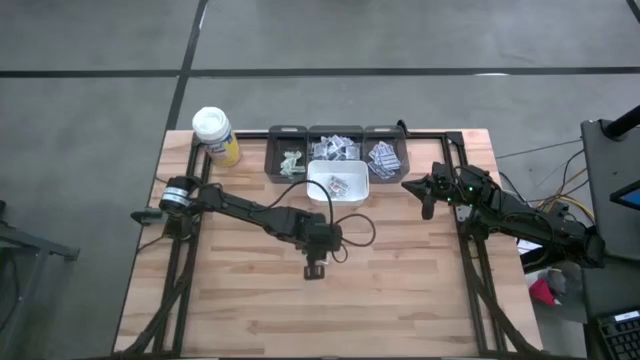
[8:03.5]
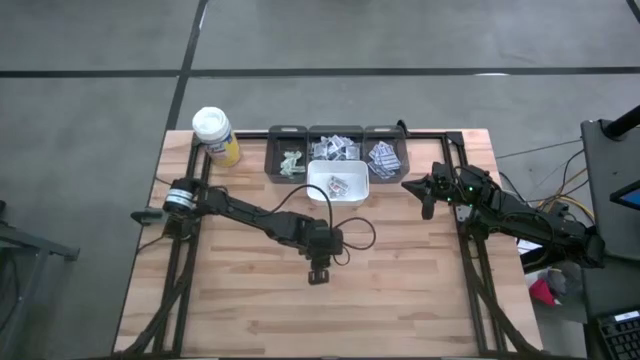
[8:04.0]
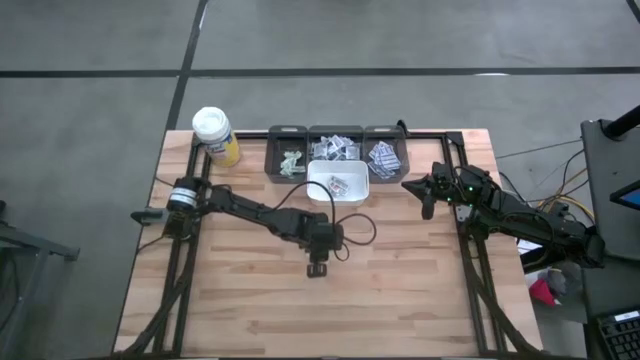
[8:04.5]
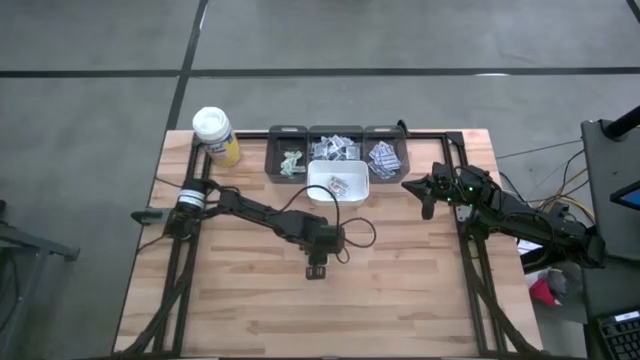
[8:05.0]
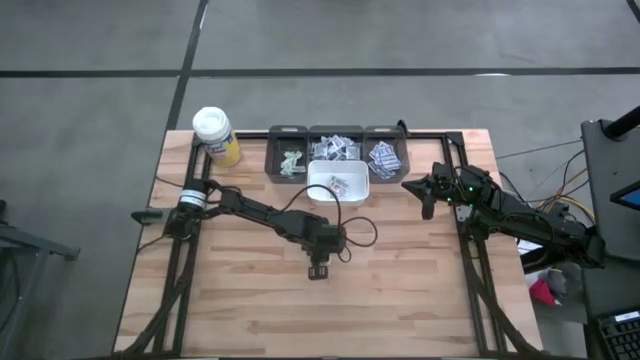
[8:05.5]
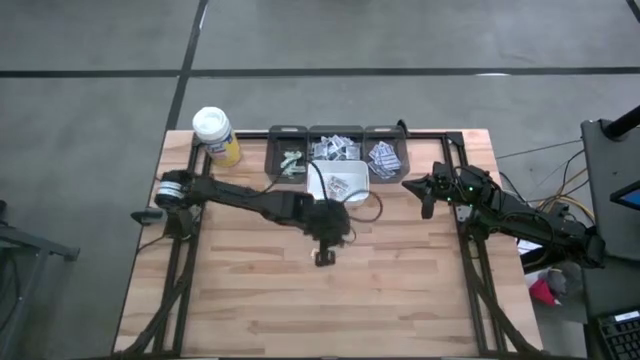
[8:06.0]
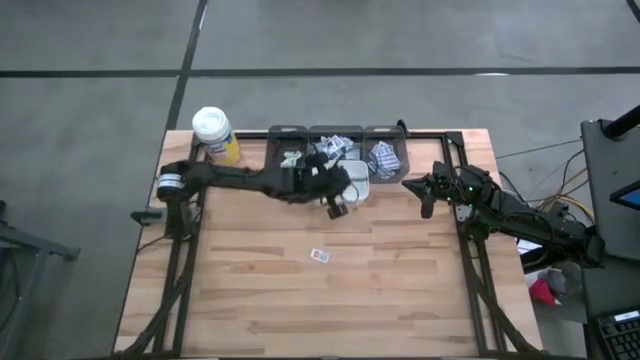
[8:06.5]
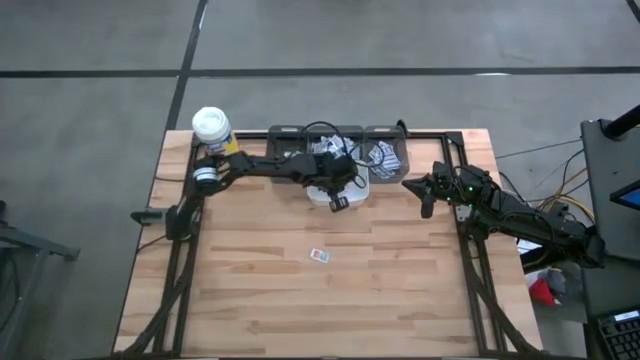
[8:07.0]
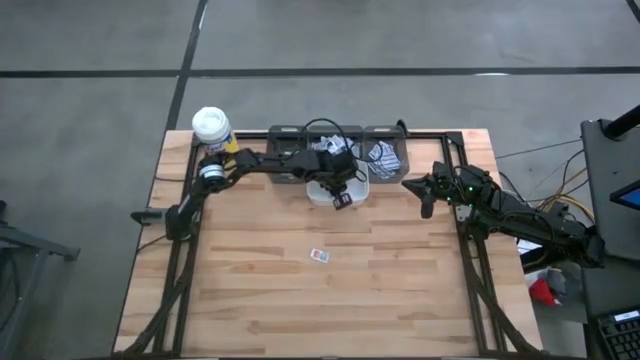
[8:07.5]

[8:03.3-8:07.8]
Task: Pick & Place First Aid Supplies
Put the top ointment pack into the white bin

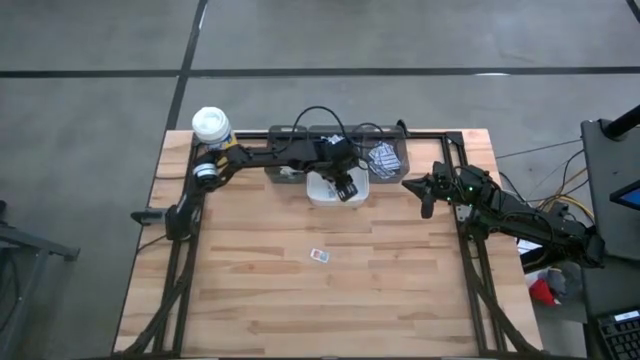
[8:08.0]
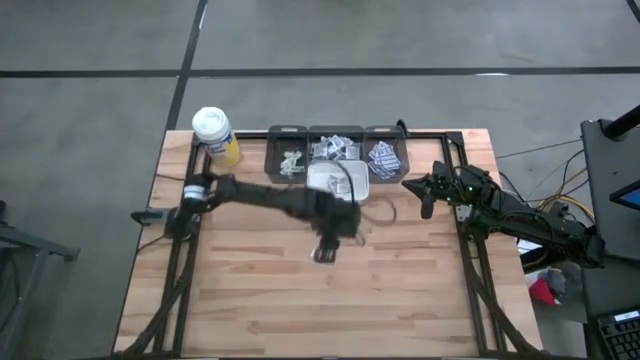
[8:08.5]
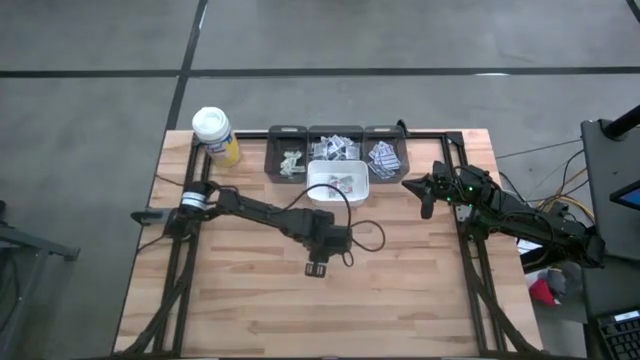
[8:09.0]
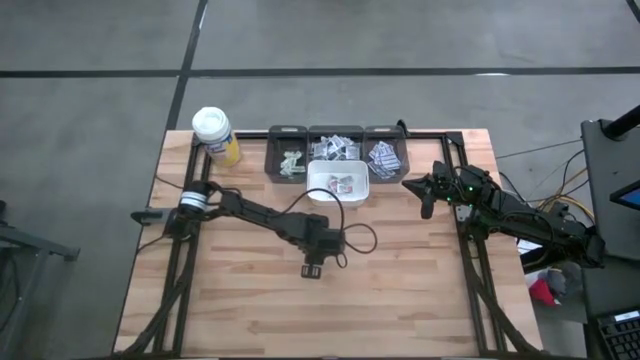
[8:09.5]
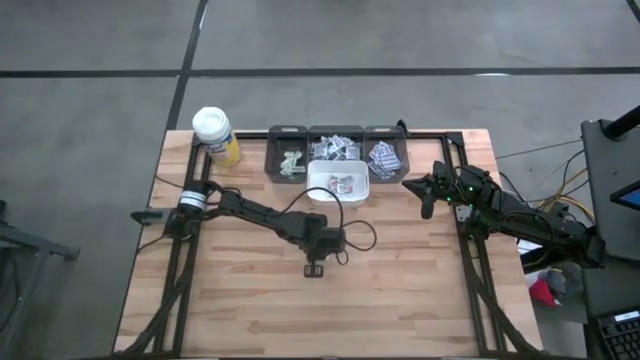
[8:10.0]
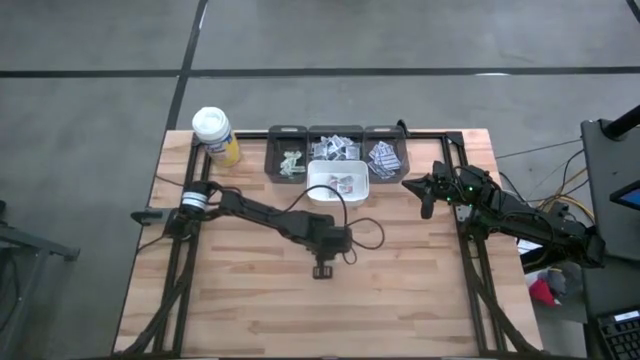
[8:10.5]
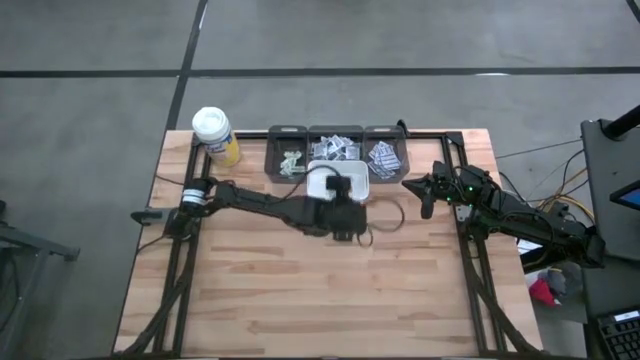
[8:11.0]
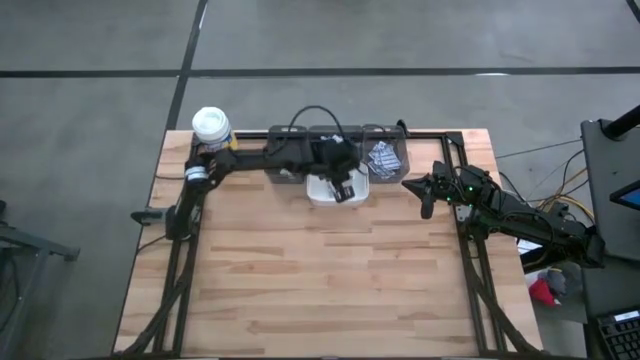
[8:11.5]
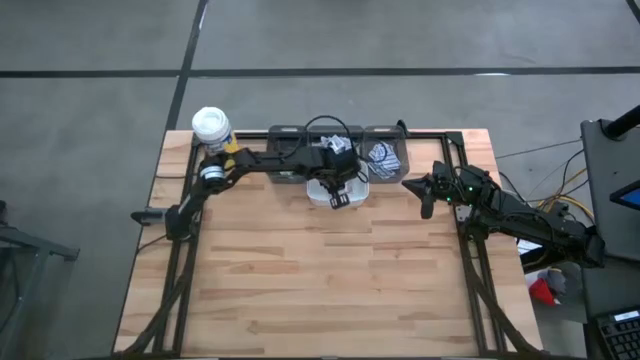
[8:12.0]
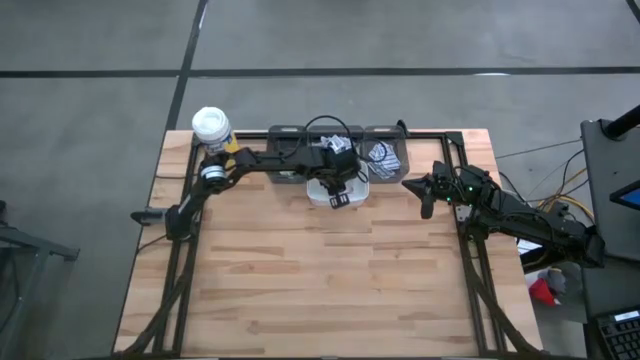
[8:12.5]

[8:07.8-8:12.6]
Put the ointment pack into the white bin

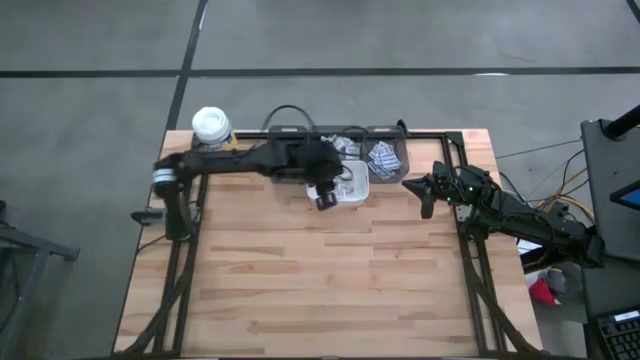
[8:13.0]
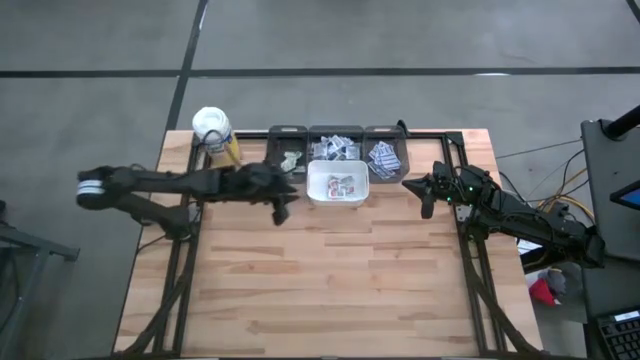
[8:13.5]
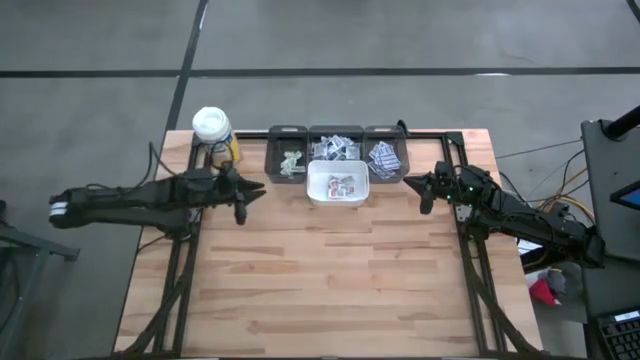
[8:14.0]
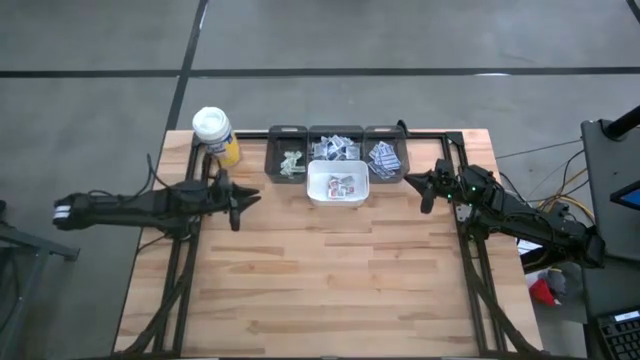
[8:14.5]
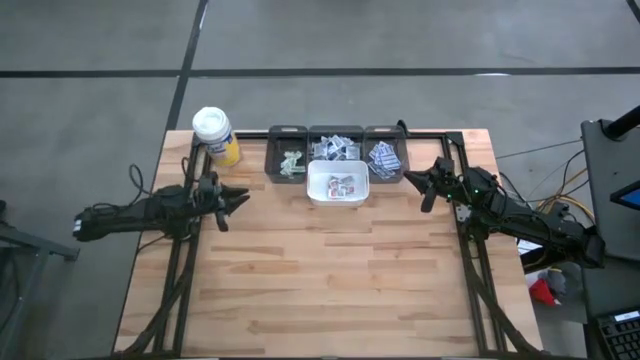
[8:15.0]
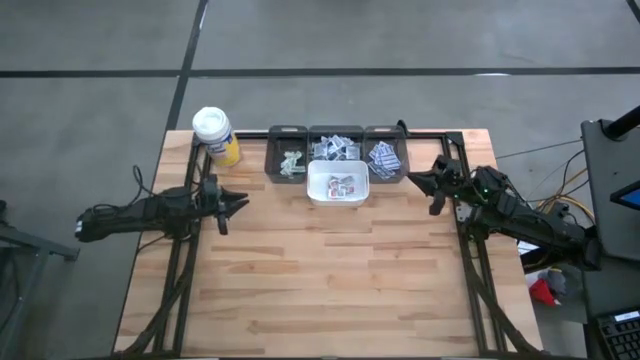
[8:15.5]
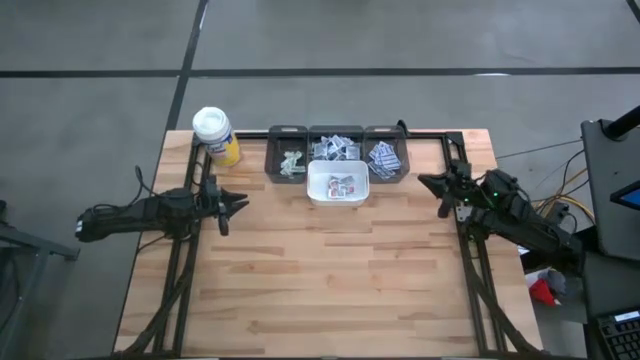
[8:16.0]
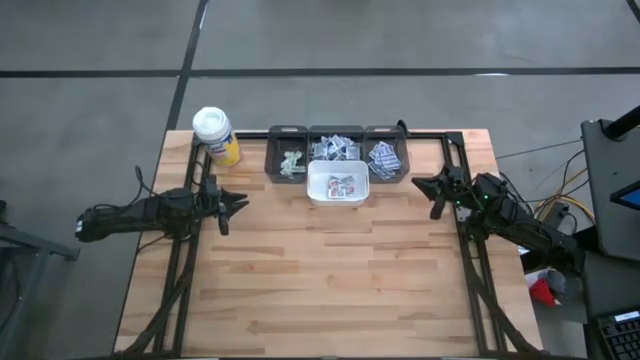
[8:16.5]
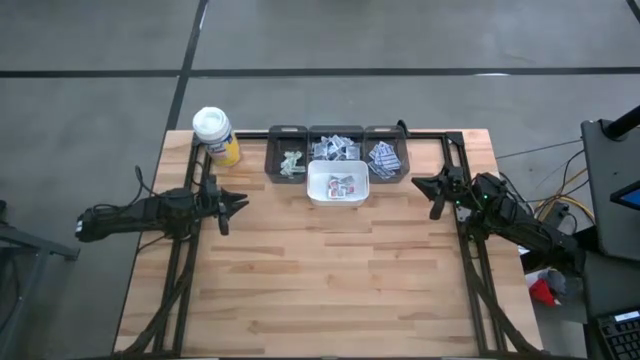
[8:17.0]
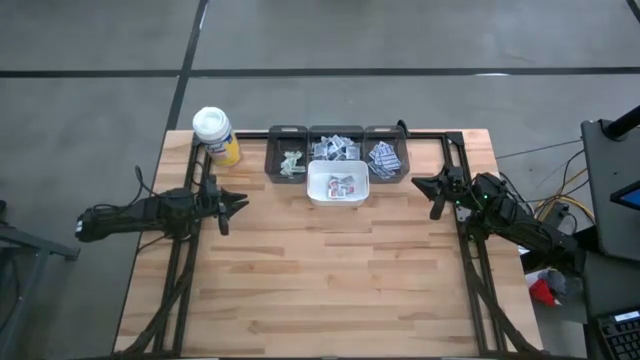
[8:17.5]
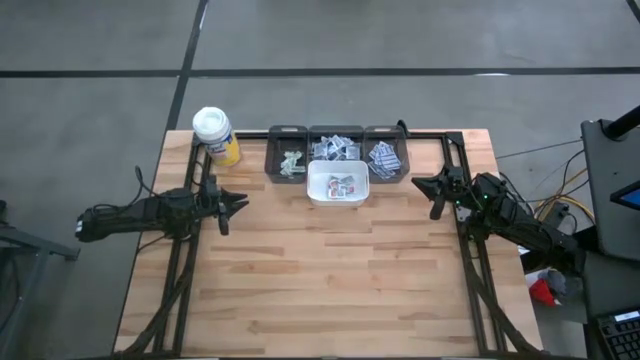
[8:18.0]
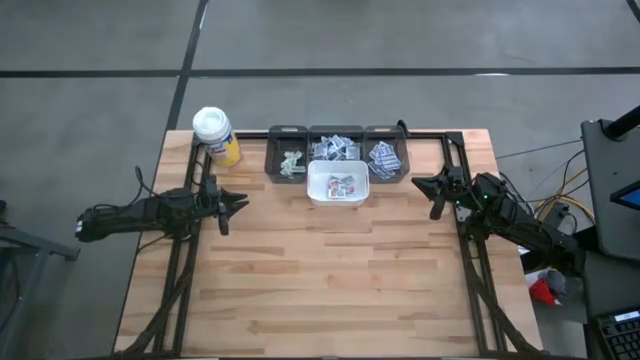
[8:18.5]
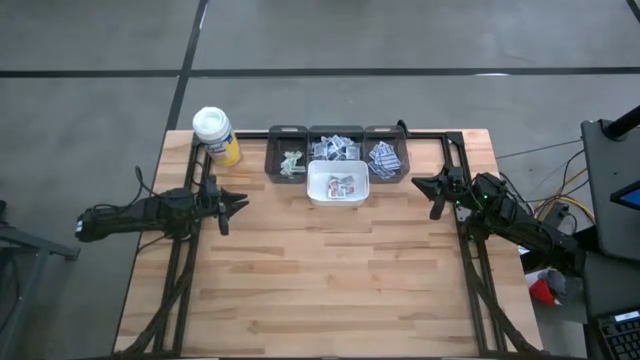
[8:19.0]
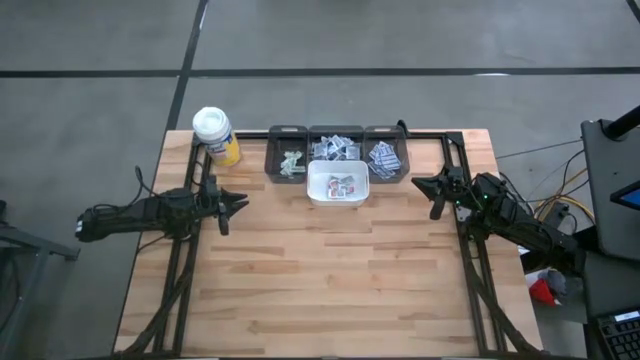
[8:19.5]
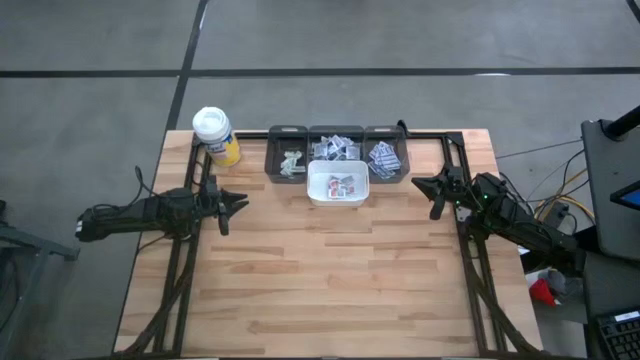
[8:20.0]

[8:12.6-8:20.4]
Return to Home Position

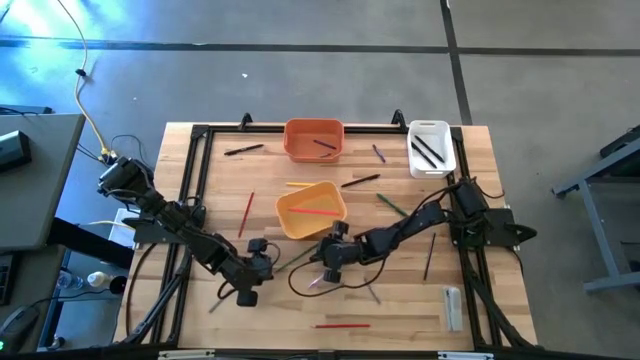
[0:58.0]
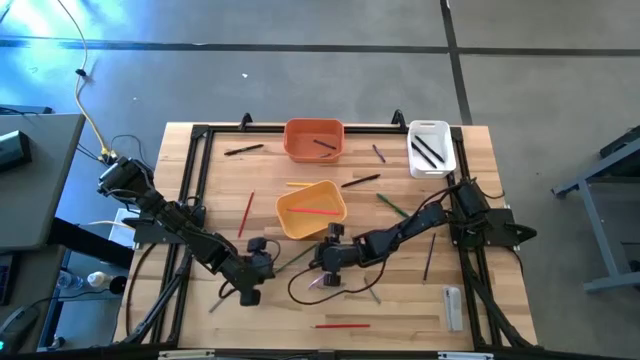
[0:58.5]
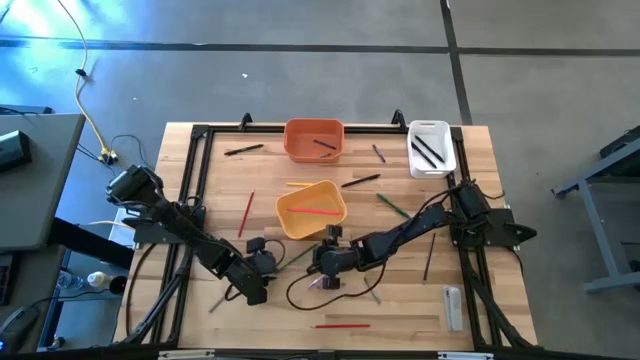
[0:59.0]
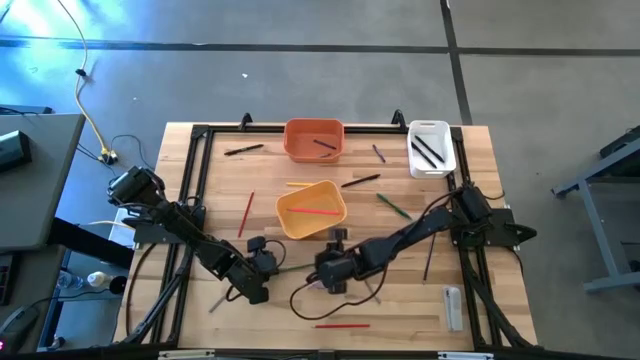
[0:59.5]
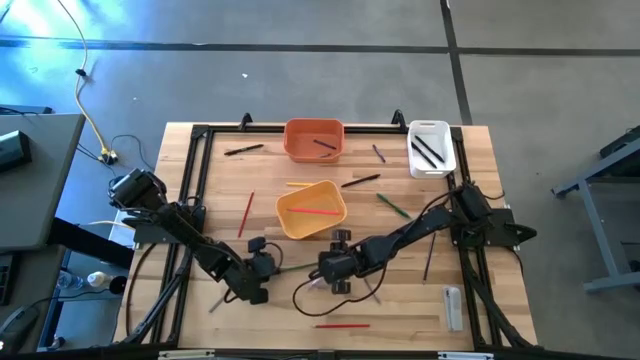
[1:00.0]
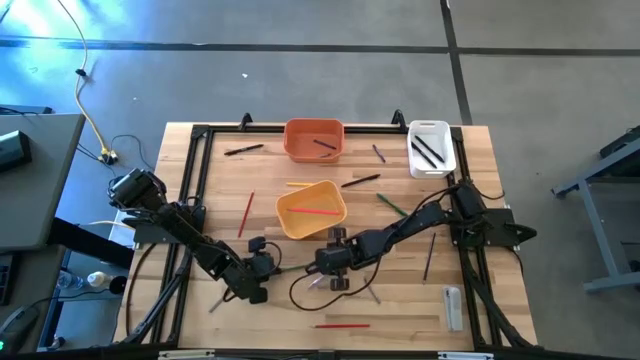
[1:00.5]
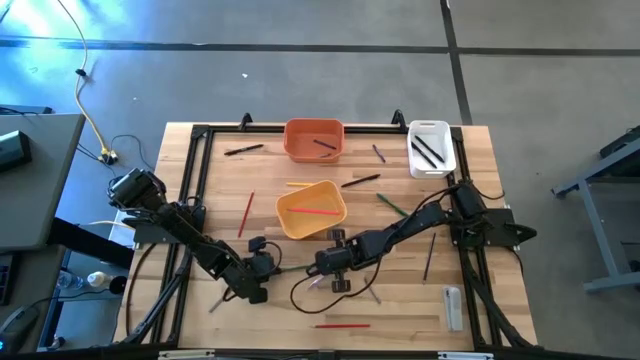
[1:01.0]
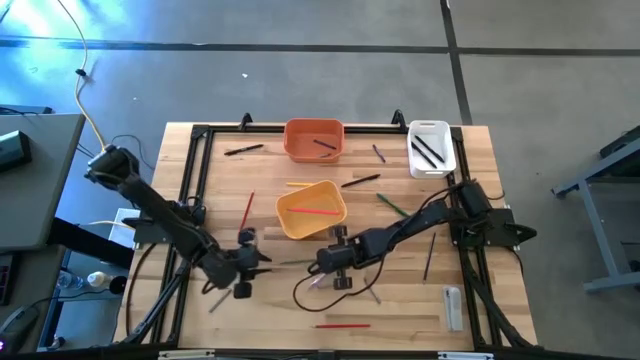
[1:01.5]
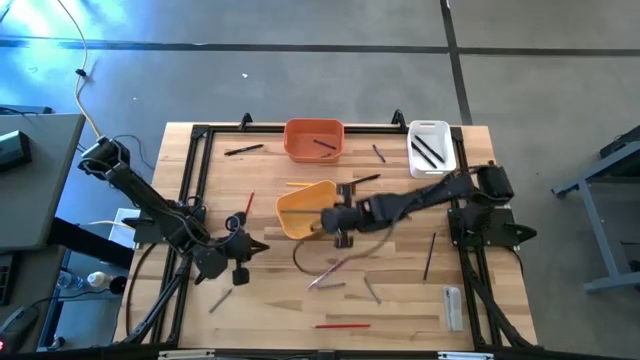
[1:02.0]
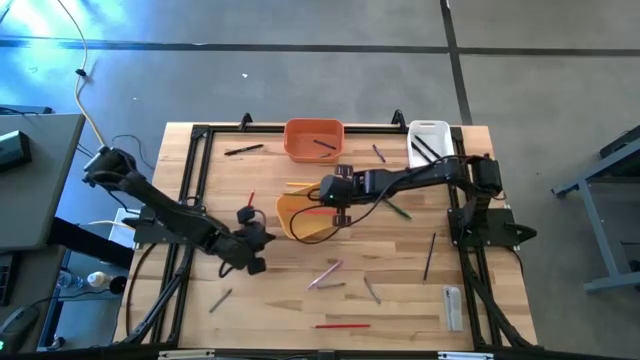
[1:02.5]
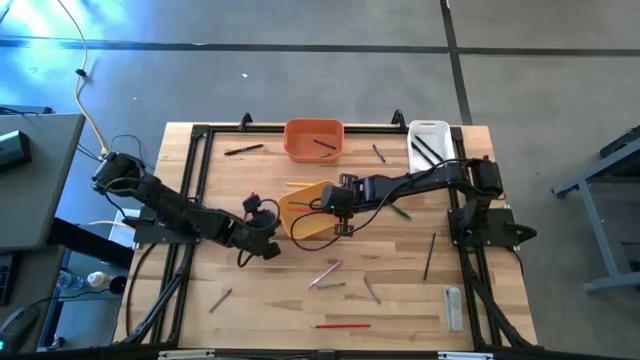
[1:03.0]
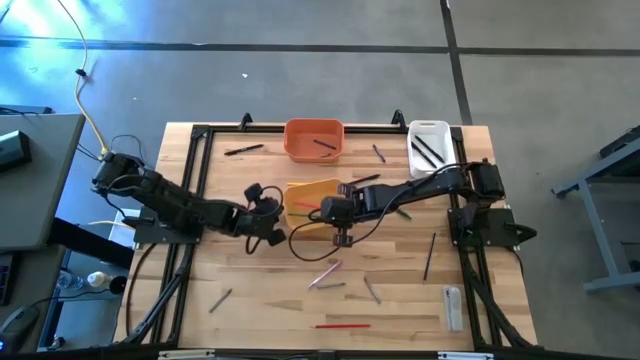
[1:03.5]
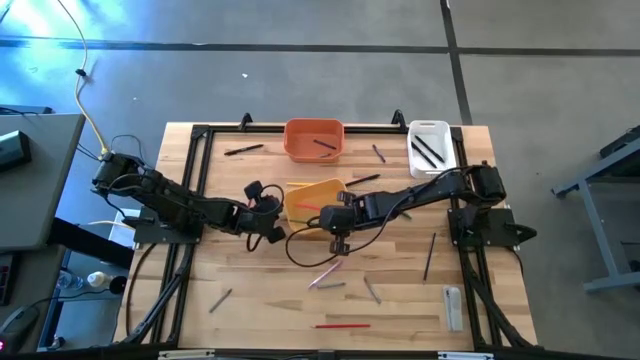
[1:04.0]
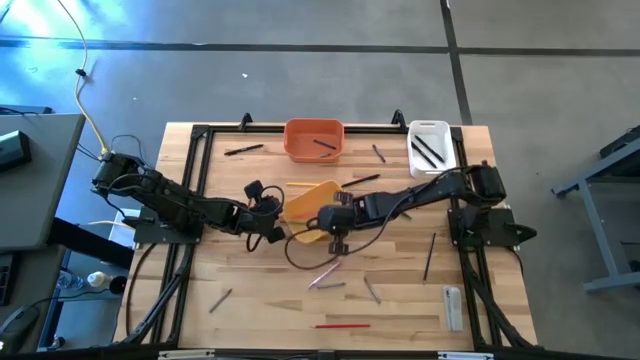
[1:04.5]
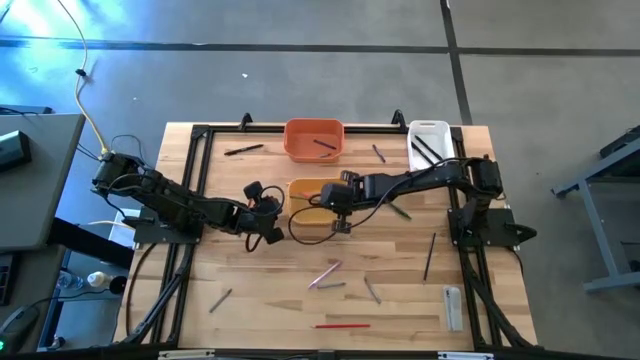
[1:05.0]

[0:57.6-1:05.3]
Task: Sort crayons/erasers/pens/pencils in bins
Put the green pencil into the yellow bin
